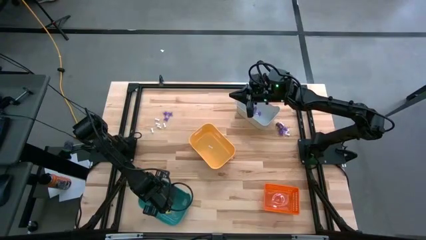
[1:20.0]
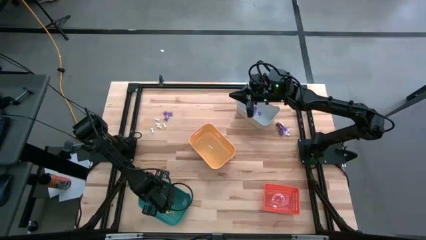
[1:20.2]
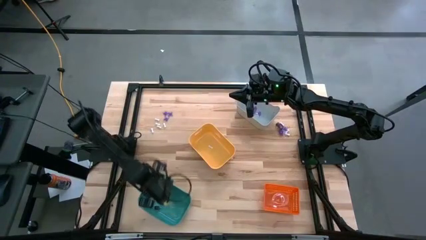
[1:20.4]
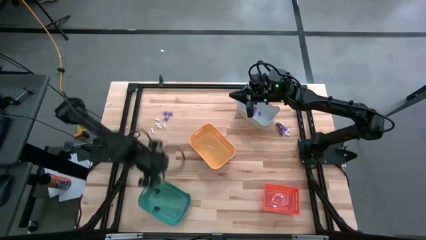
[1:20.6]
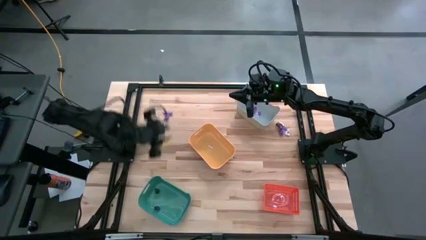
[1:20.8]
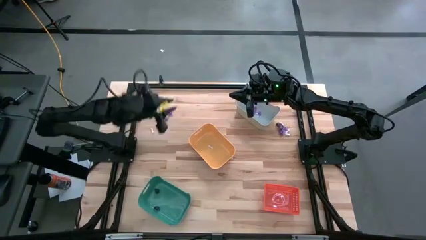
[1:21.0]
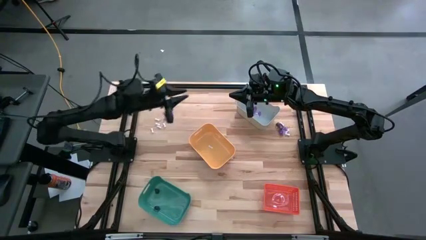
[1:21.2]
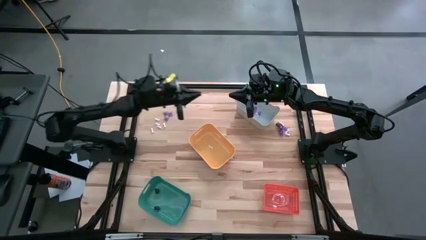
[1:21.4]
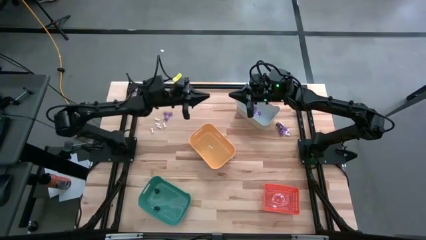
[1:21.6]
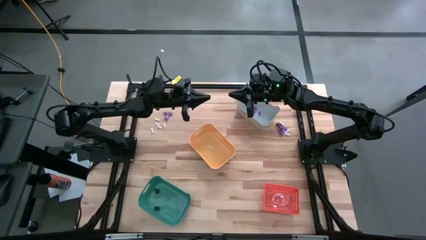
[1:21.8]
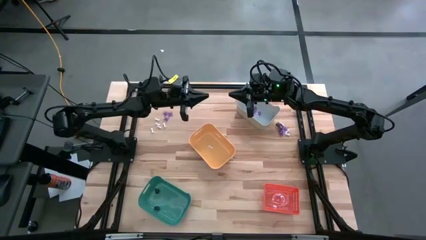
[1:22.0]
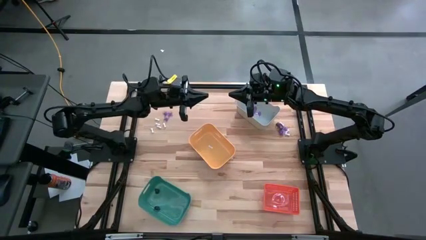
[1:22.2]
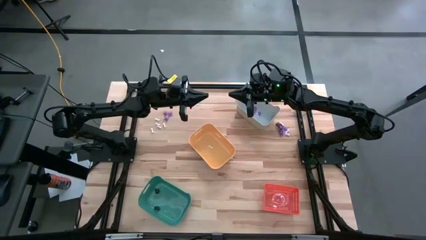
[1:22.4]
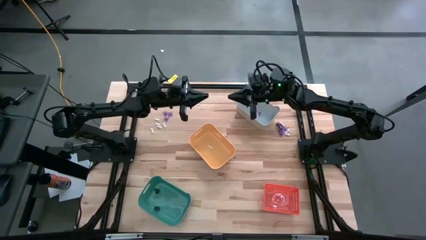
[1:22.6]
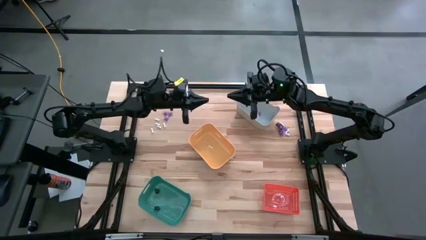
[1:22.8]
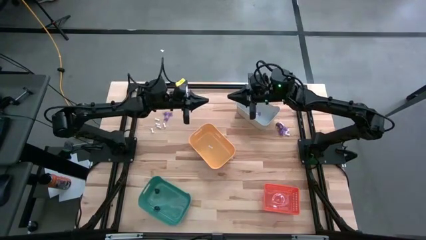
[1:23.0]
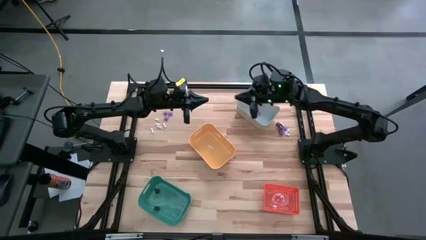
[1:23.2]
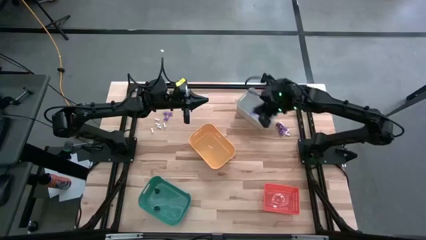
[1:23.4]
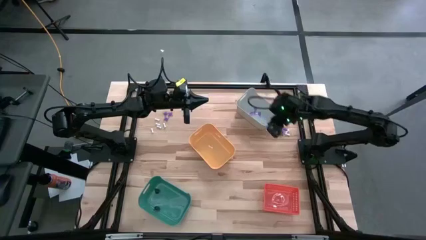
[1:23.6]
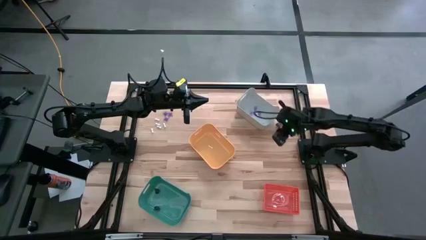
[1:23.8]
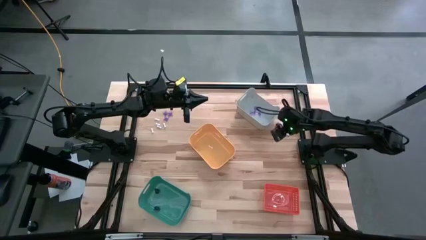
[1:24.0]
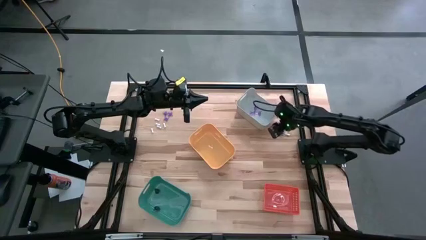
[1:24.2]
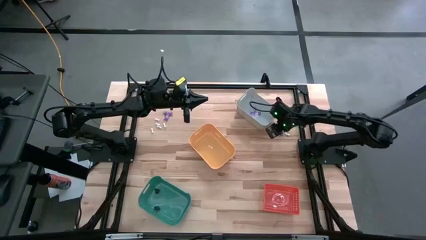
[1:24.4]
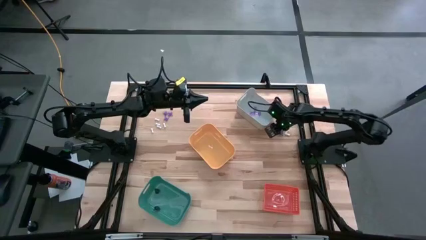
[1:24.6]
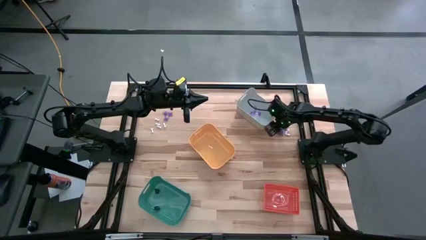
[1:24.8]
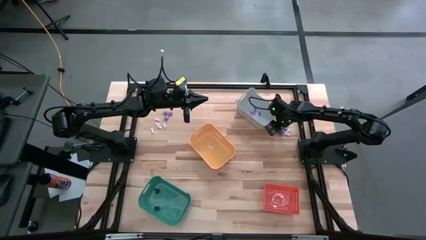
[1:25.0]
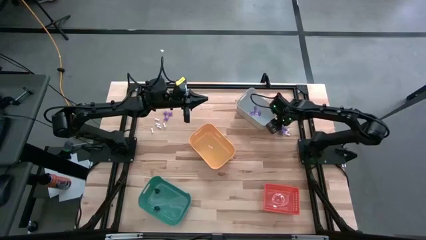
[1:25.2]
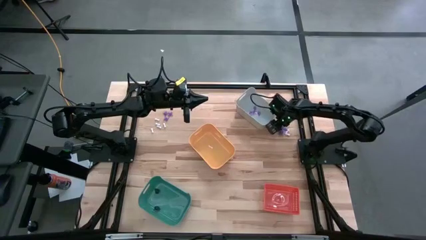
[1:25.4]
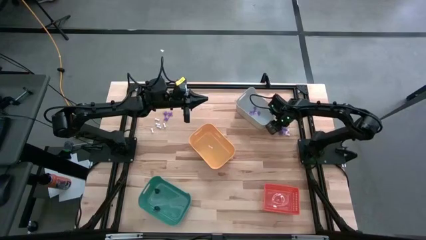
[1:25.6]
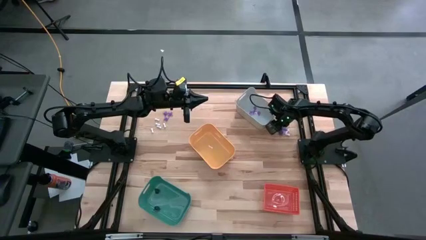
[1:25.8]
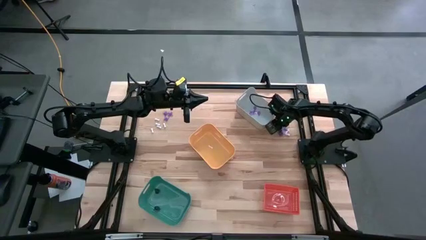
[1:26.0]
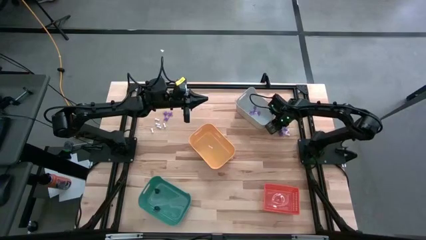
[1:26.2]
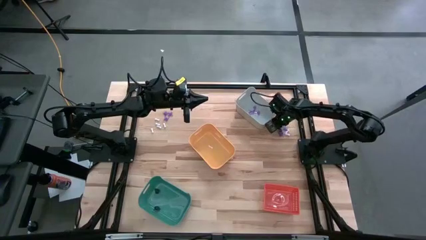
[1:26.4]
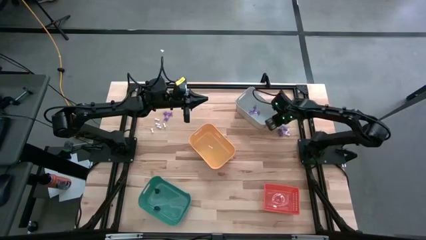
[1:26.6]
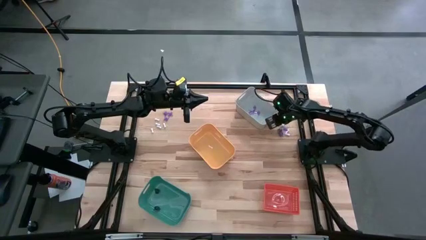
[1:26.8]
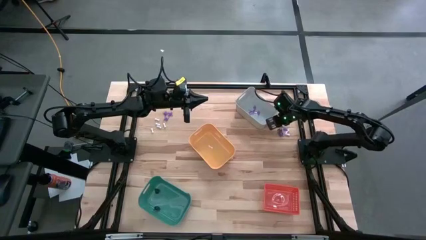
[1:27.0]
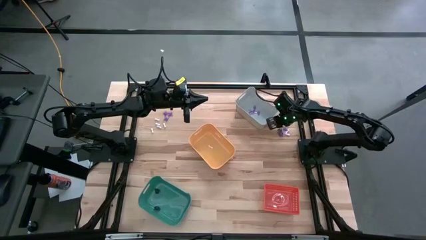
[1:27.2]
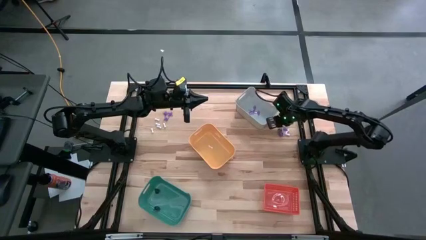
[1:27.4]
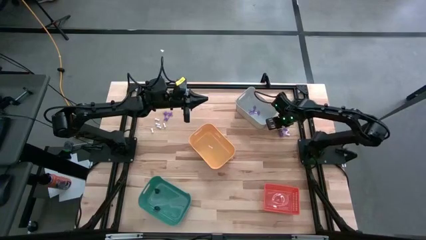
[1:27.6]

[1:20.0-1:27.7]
Task: Sort Halloween decoration
Put the black skull toy into the green bin

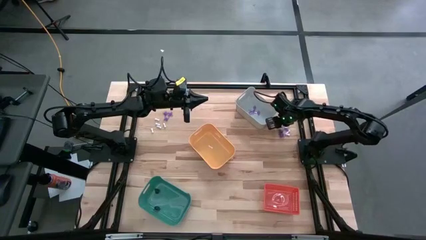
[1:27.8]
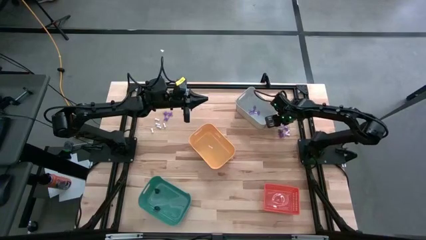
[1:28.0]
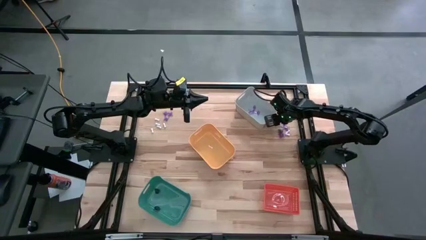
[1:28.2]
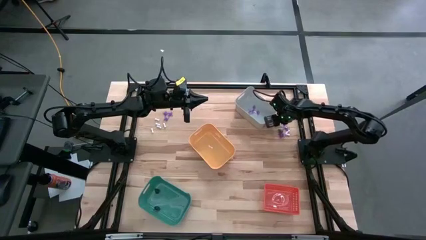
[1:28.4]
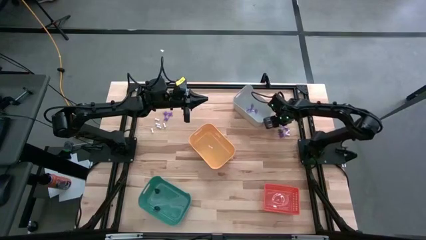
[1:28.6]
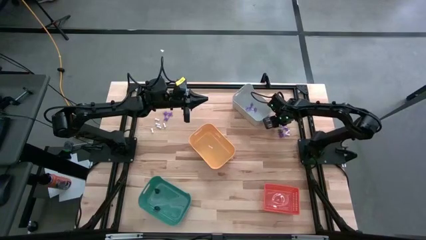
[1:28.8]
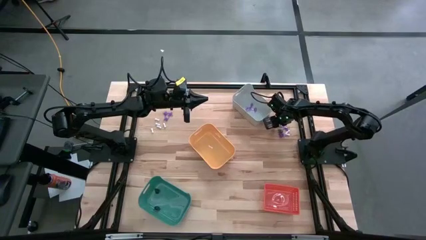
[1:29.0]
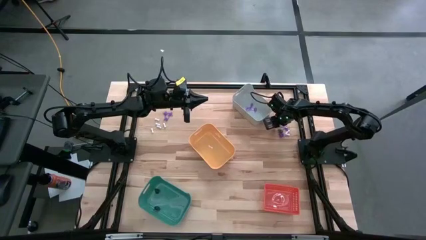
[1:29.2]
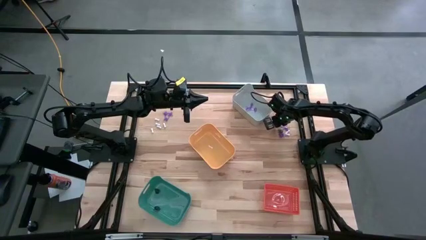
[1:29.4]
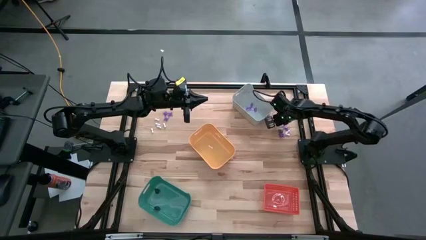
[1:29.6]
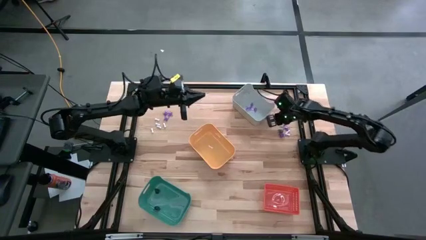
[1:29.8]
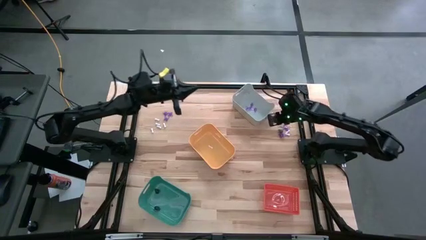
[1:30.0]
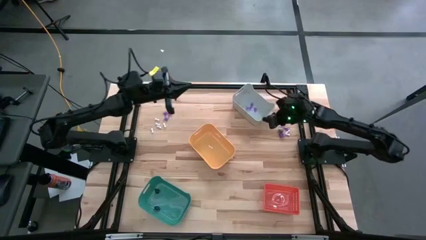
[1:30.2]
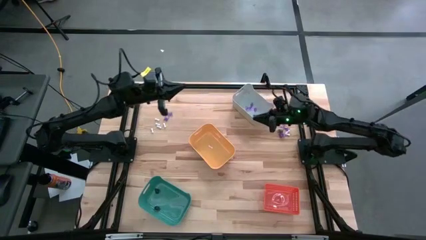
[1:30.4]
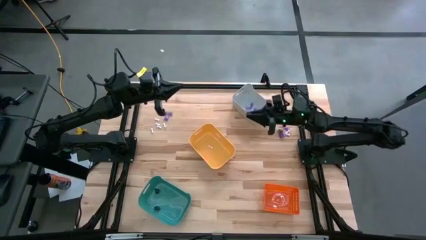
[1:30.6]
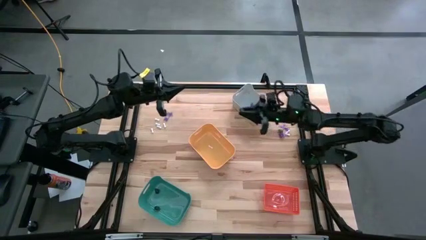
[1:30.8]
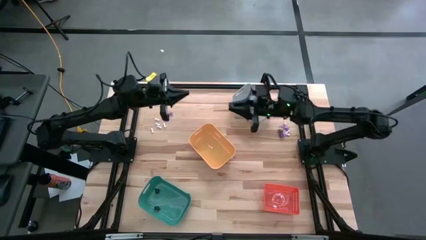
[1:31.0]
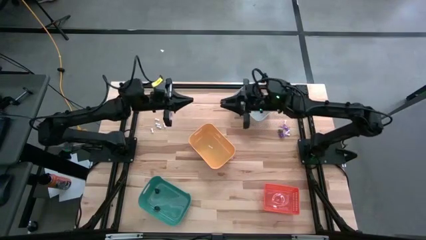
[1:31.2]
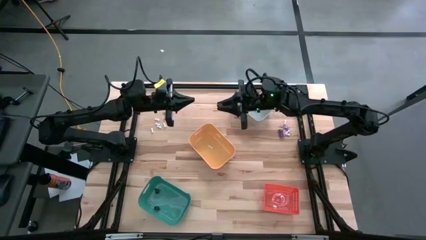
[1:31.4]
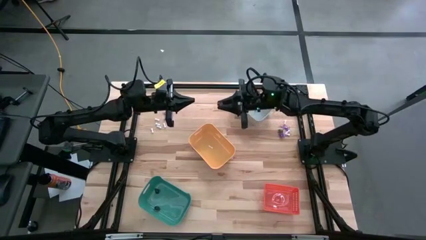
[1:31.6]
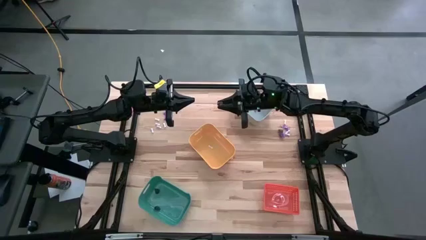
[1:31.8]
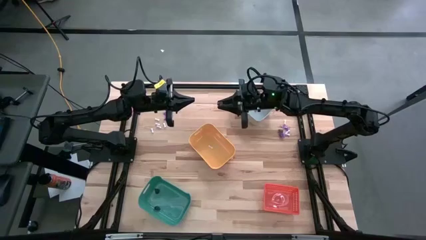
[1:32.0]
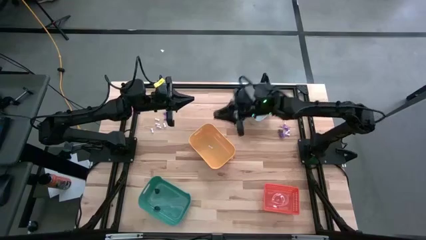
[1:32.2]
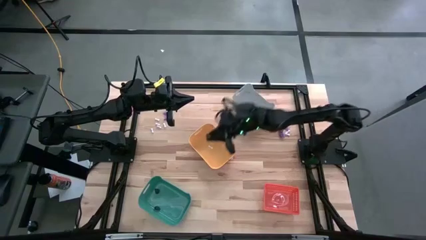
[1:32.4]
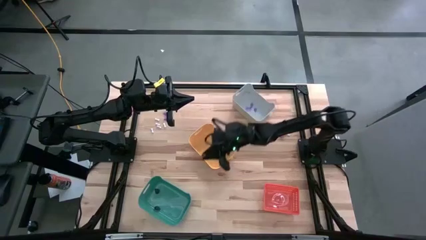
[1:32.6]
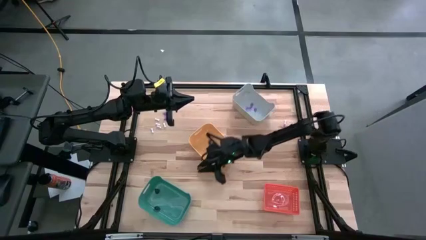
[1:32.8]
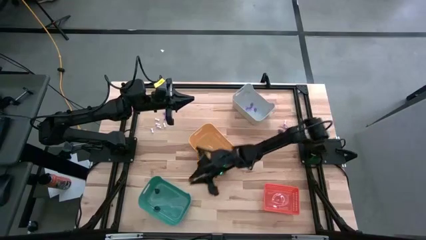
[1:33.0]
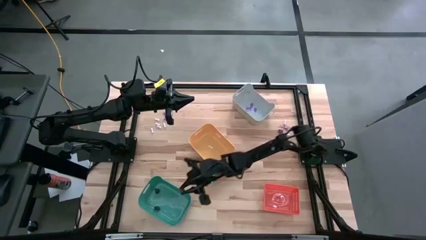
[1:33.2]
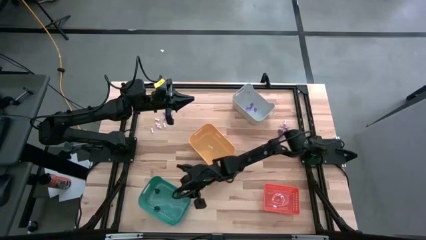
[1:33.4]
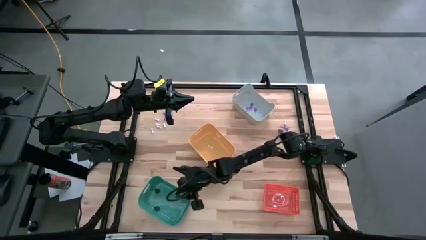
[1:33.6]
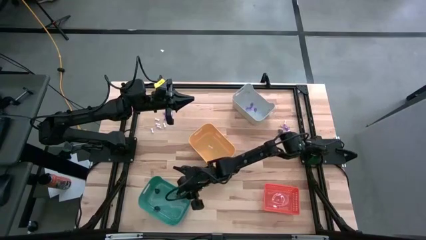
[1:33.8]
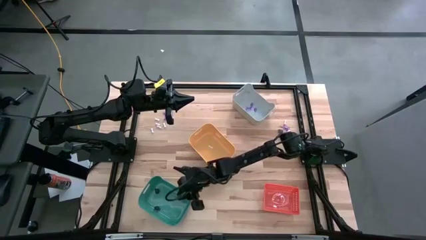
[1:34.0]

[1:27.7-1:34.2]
Put the black skull toy into the green bin

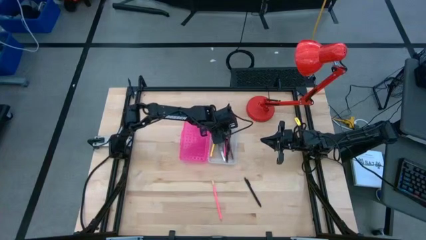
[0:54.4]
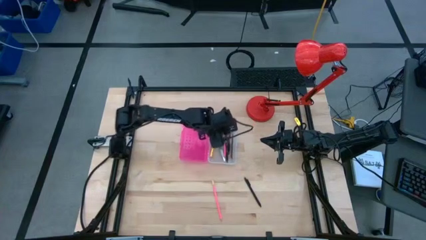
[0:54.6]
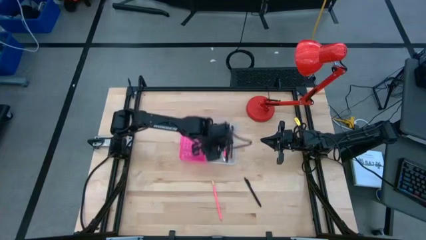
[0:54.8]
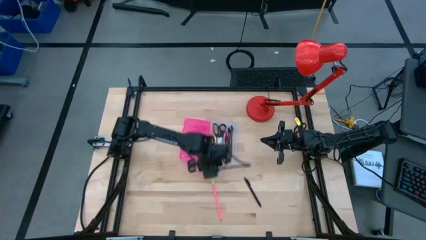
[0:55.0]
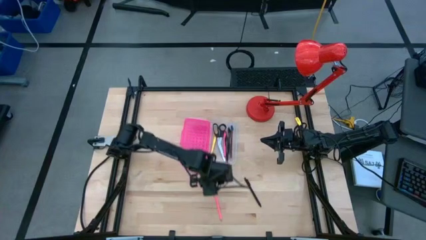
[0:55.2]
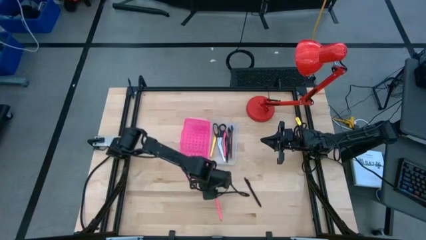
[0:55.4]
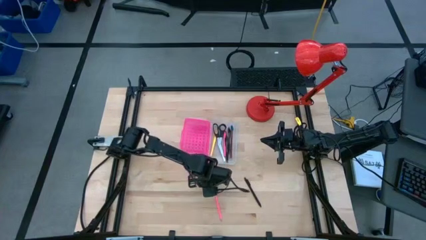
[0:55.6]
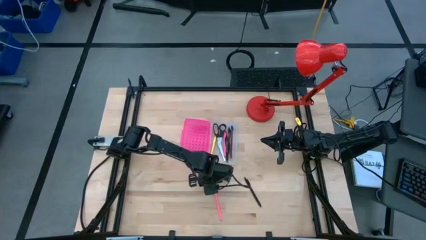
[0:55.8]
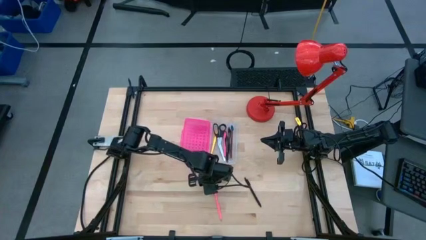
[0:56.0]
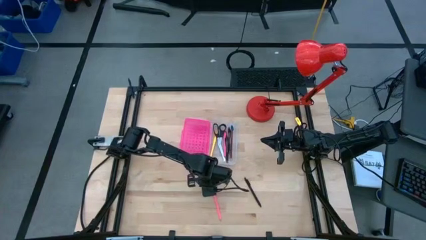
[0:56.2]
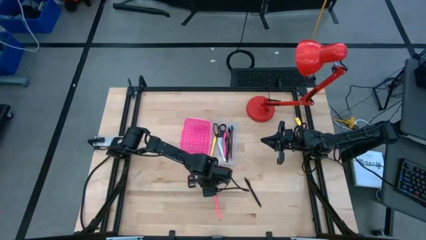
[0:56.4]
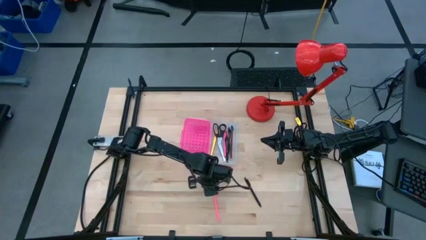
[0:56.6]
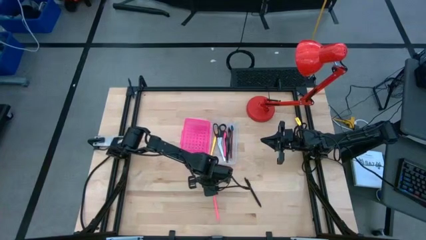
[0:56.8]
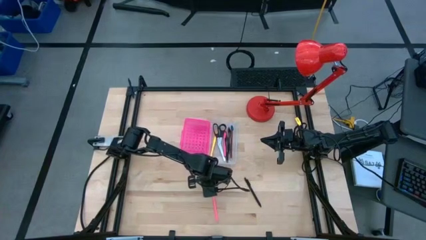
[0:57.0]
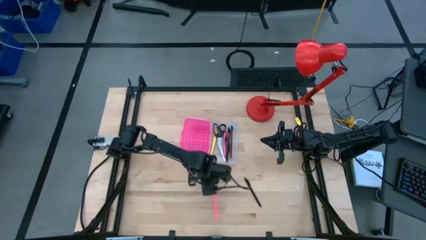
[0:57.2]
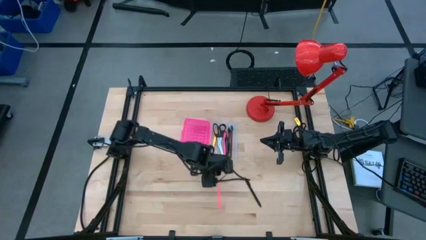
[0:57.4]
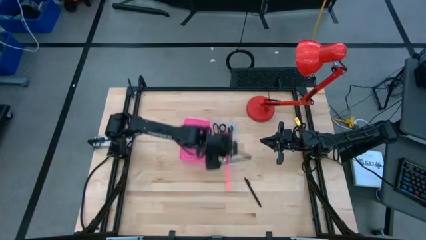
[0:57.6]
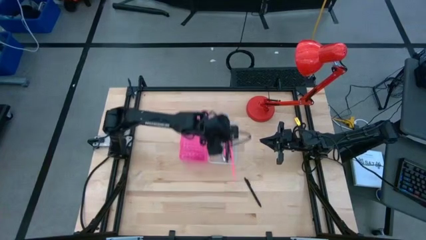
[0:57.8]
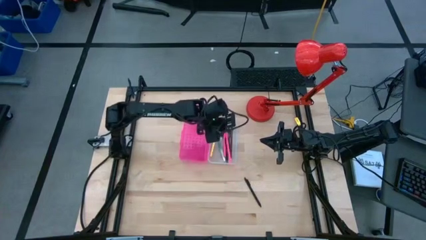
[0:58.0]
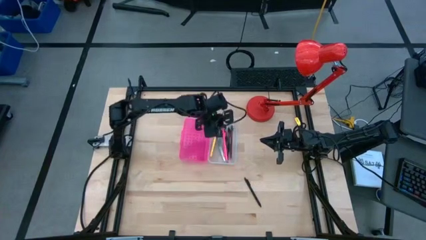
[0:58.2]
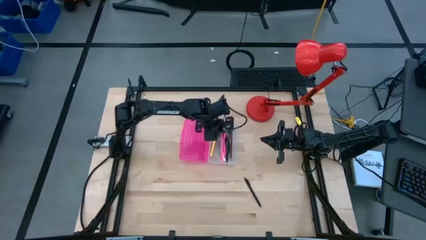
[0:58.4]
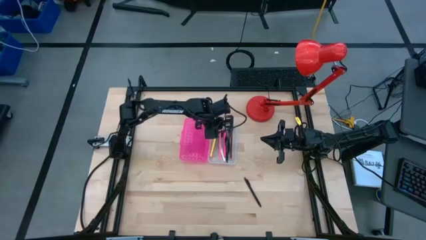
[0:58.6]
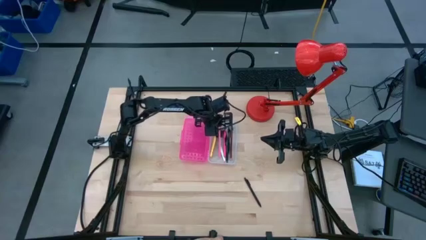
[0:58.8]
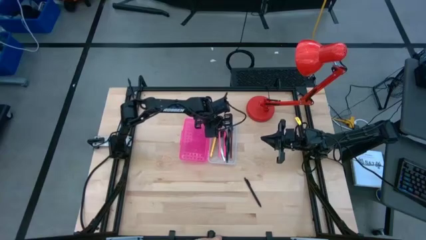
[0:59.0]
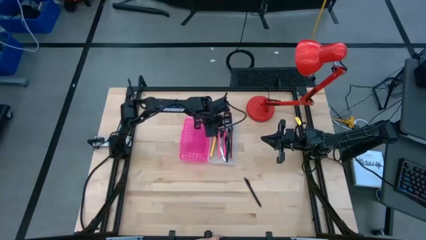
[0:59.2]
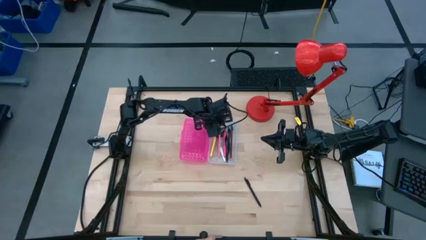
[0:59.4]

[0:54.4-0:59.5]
Task: Pick & place school supplies into a supply box
Put the pink pencil into the supply box
